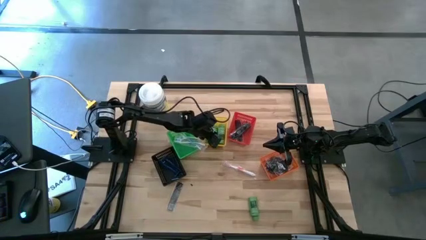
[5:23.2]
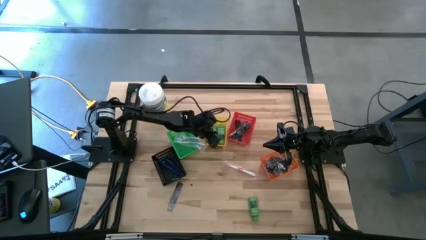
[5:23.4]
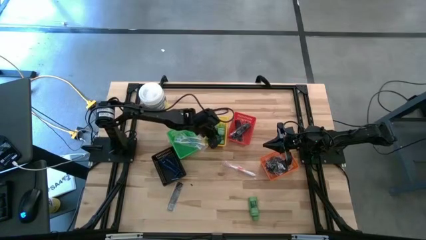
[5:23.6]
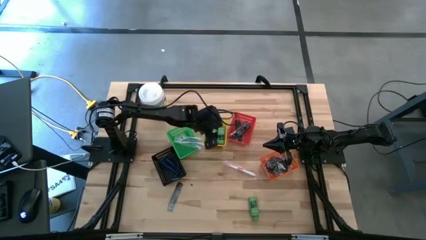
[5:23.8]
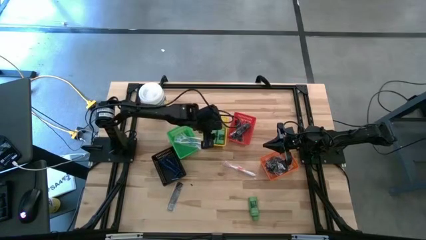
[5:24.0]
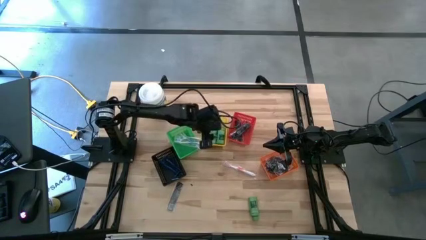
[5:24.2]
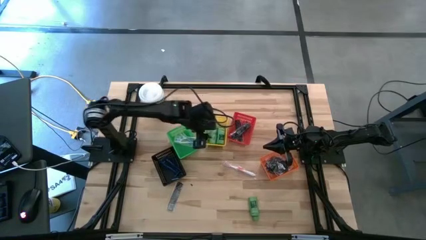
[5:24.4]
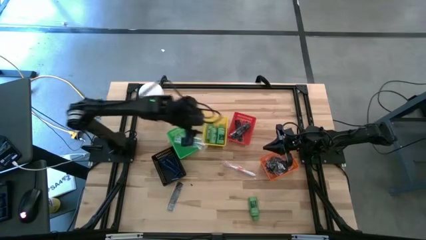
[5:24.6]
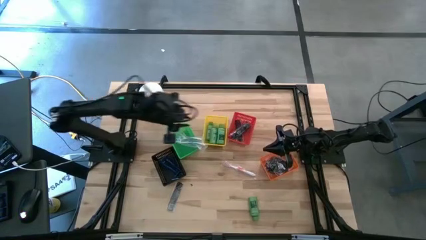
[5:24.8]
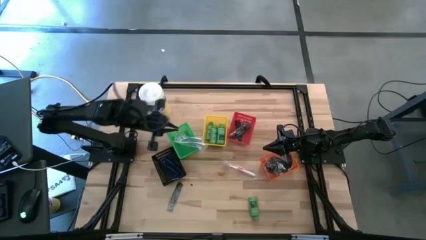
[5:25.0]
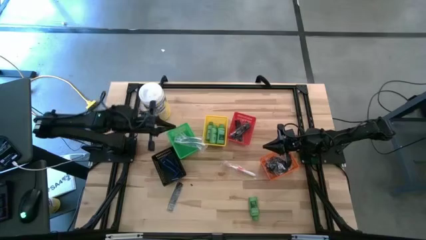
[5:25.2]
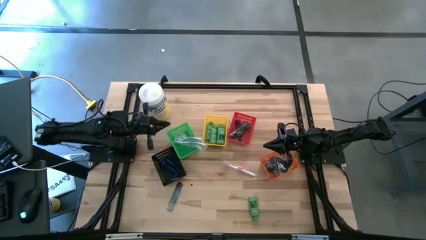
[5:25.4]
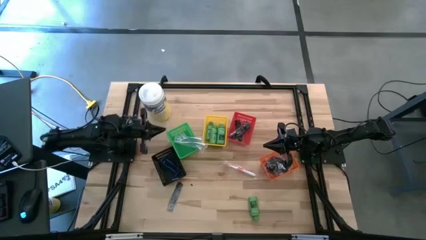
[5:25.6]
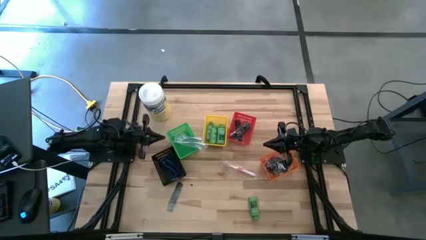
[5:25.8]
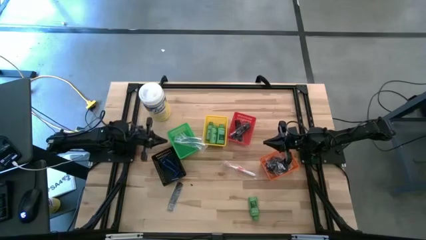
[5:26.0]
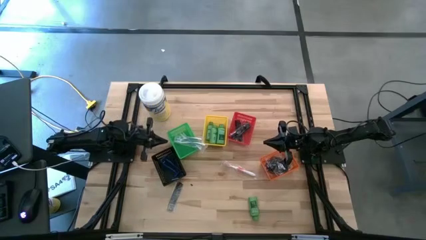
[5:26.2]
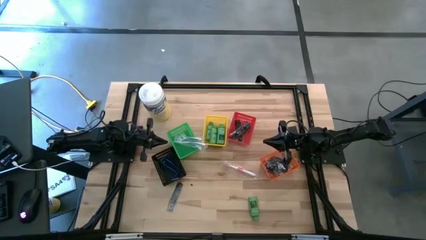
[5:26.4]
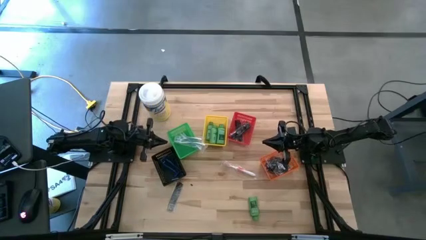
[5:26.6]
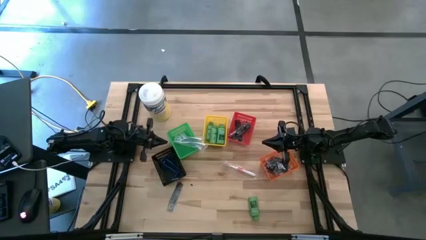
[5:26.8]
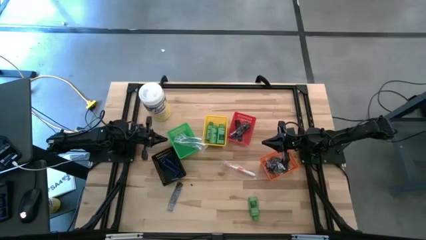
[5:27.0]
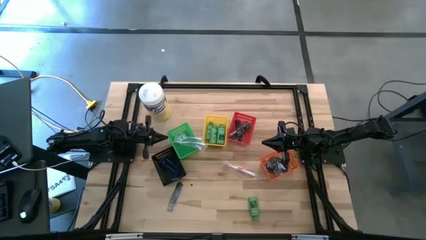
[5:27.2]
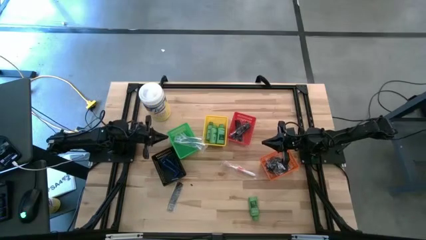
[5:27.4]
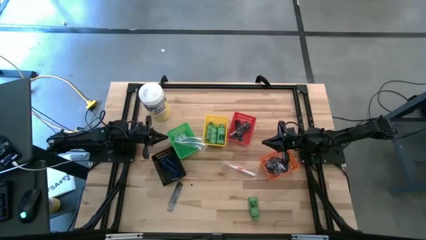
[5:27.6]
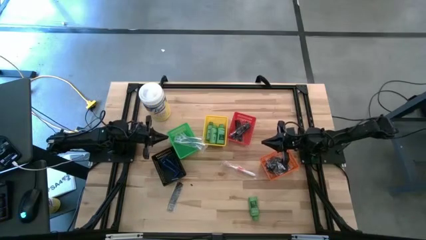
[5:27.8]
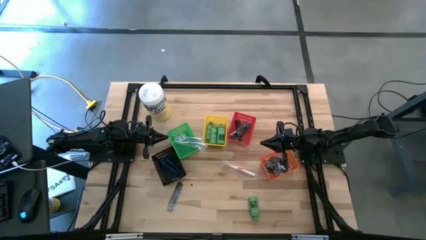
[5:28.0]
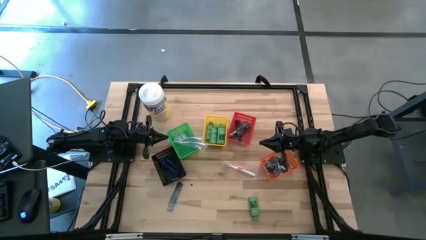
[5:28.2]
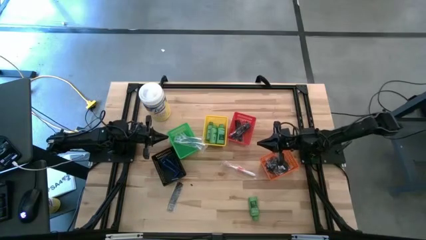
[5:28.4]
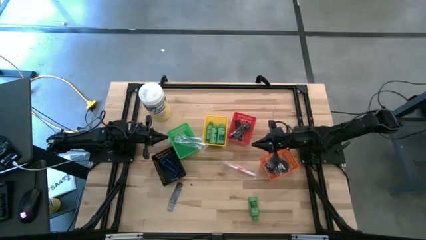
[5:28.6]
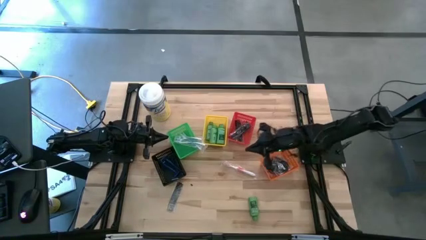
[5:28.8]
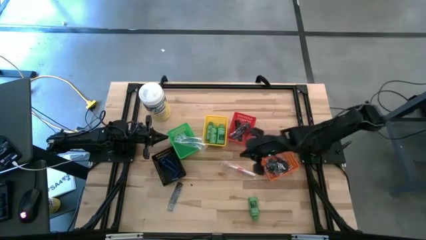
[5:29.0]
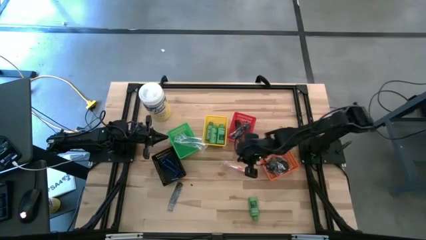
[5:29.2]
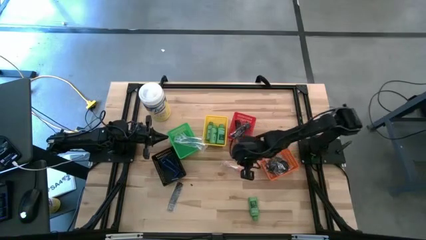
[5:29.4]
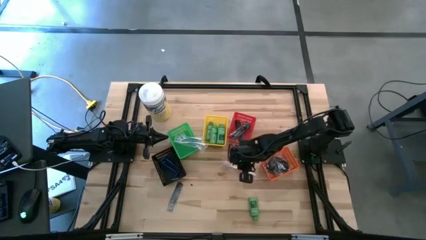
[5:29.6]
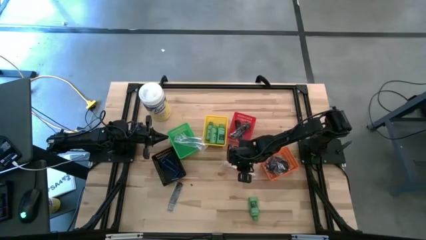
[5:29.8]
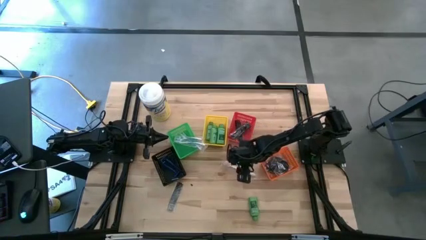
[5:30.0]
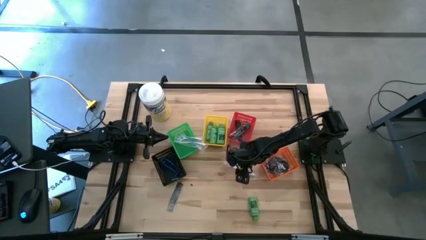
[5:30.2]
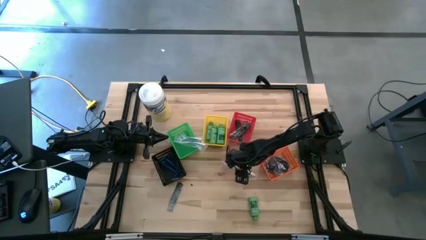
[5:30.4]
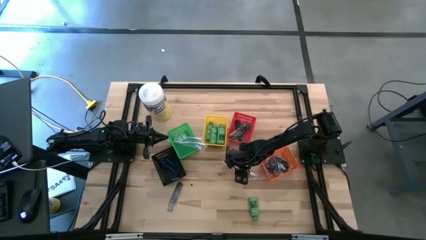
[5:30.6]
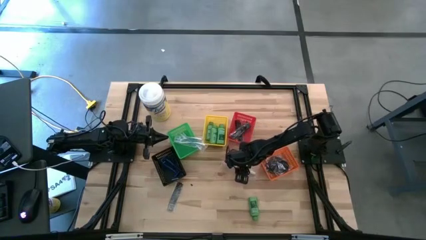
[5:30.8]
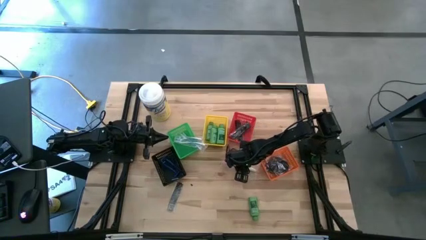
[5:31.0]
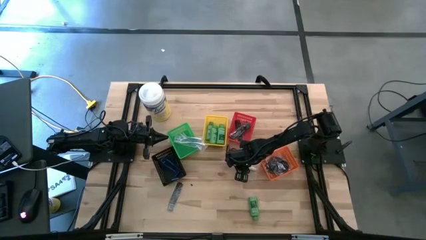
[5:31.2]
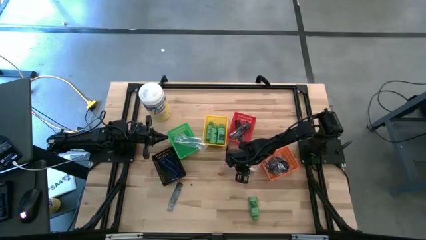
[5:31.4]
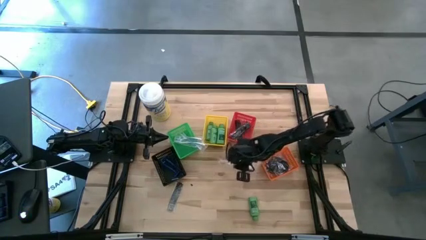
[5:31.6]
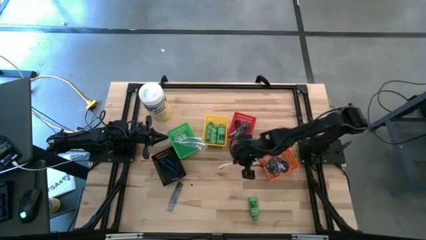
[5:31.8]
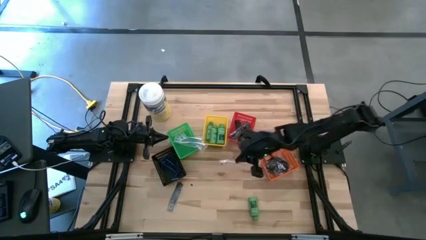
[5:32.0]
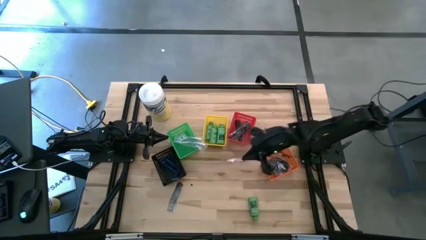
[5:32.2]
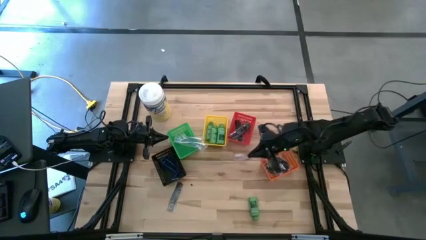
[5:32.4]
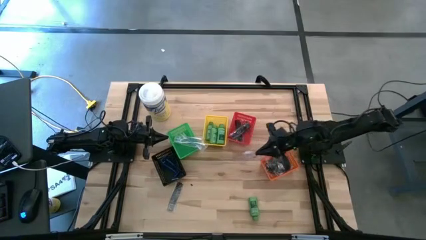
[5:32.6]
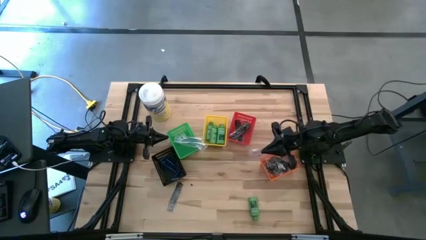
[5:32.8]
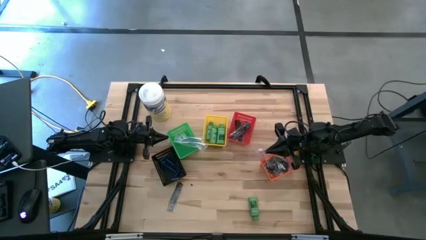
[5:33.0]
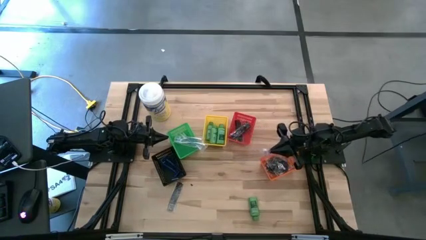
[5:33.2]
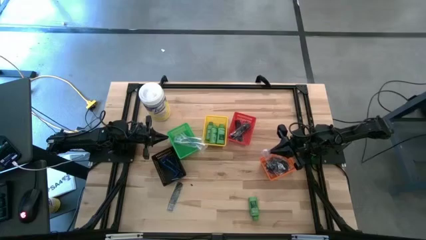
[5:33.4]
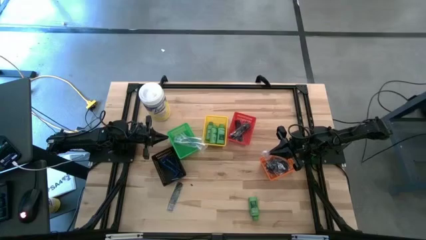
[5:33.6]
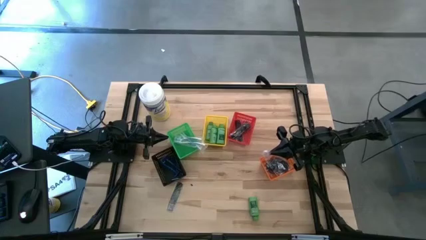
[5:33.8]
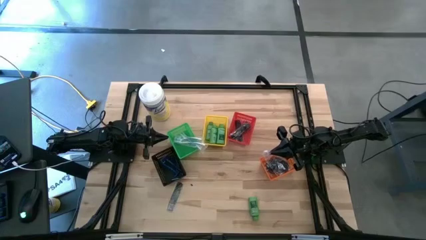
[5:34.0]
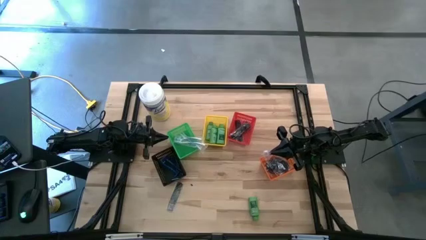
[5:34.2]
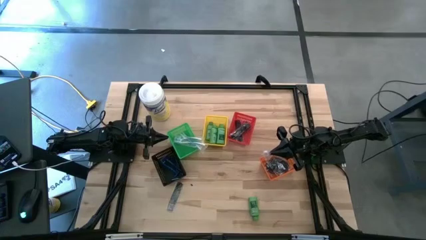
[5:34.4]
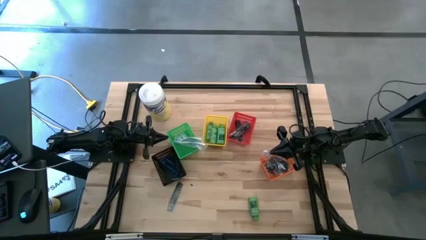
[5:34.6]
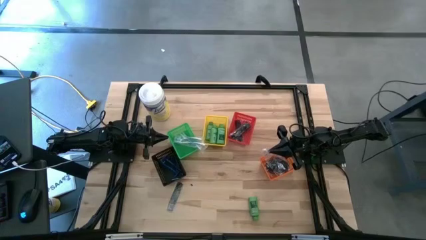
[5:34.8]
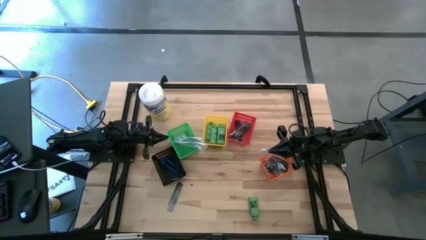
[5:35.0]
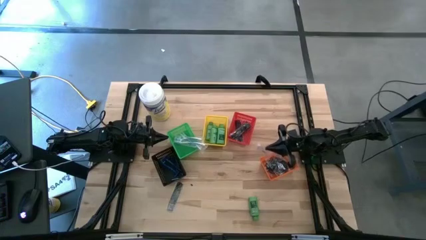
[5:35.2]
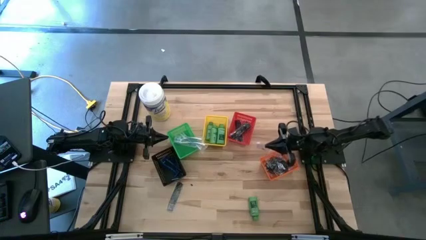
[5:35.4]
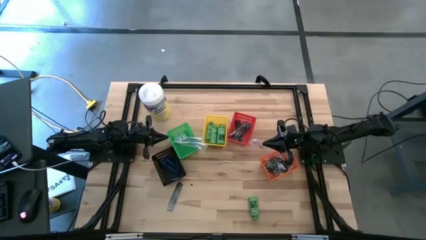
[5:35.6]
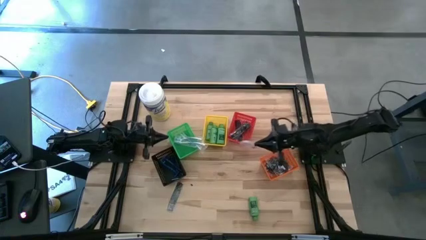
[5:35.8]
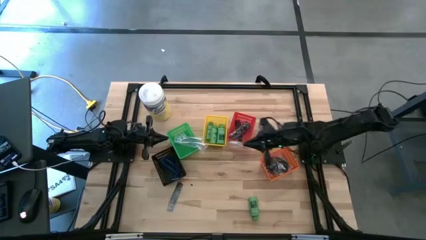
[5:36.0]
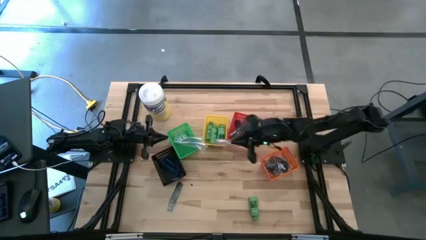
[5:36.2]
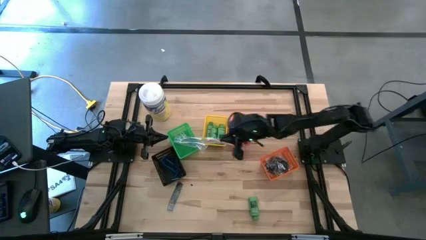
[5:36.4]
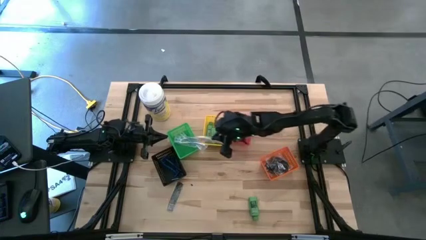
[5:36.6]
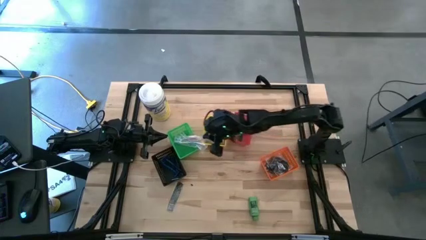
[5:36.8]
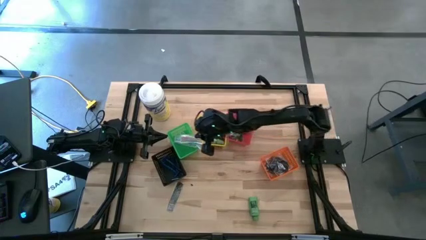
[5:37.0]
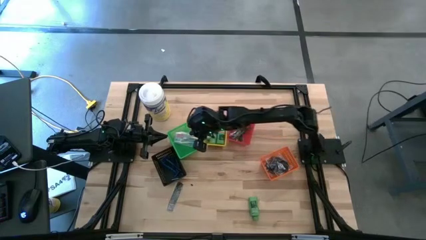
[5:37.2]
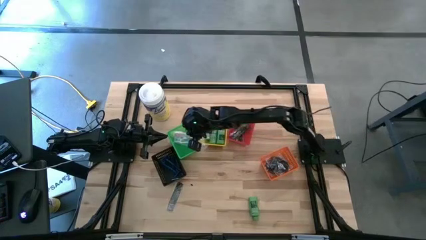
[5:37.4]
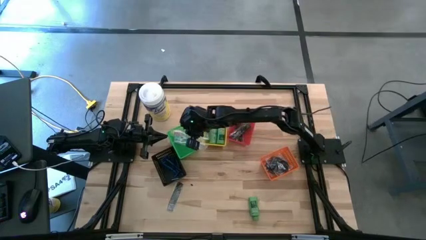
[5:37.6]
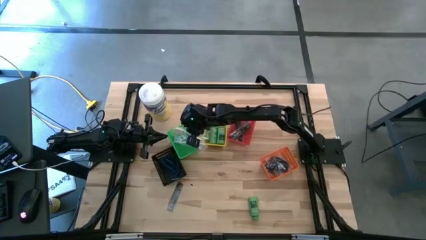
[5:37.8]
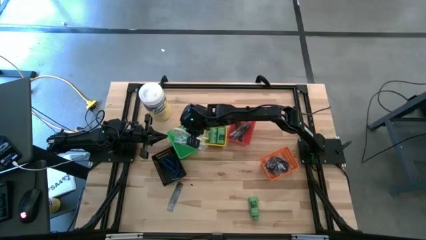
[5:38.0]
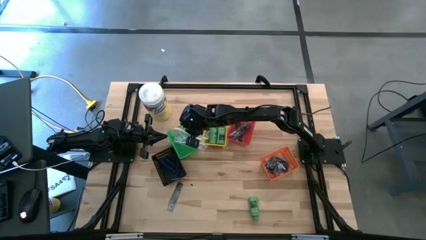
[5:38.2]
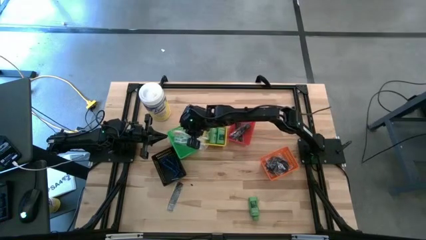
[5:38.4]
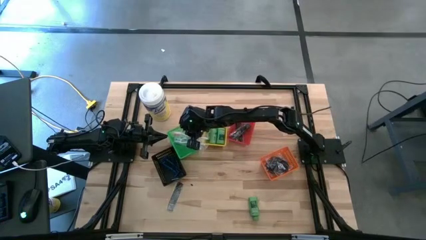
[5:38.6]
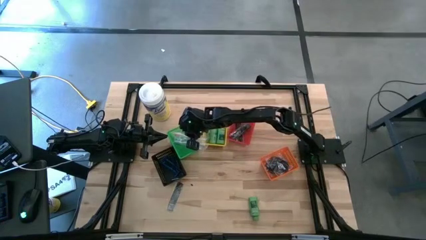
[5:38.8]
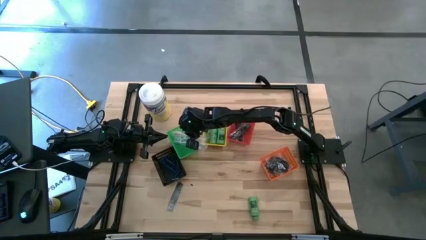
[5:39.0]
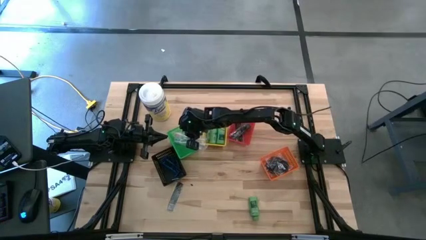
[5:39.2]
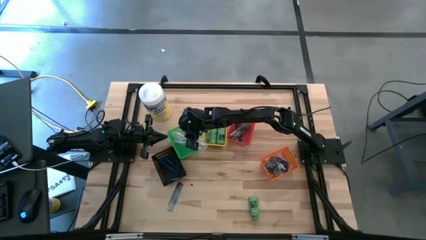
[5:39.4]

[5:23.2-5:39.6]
Task: Pick & Place Travel size toiletries
Put the orange toothbrush into the green bin
